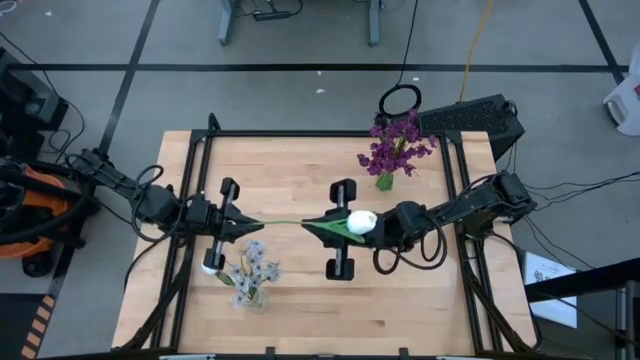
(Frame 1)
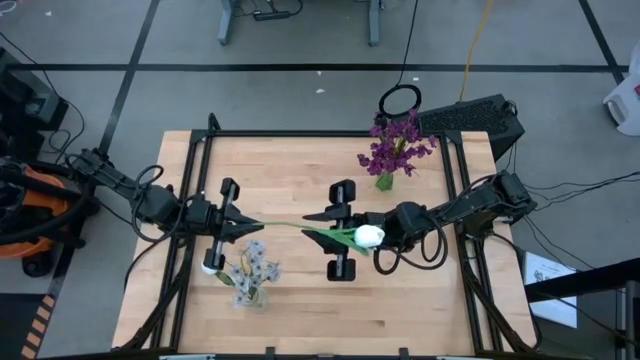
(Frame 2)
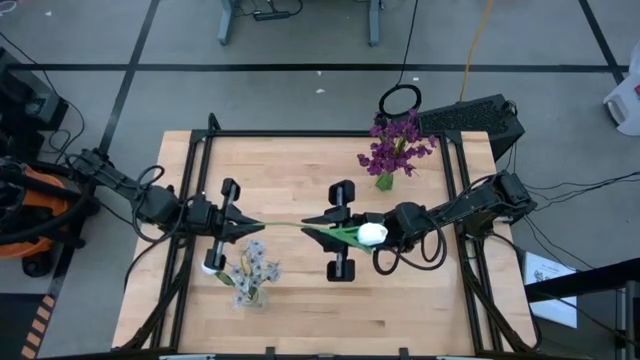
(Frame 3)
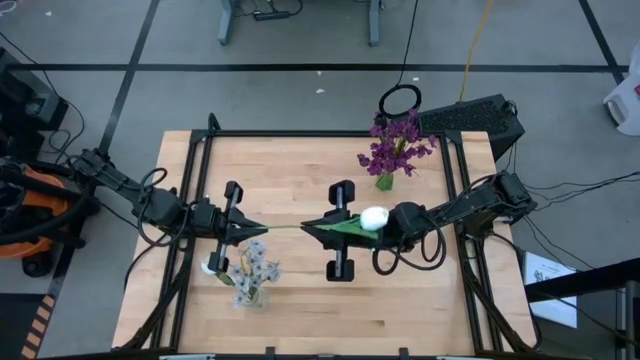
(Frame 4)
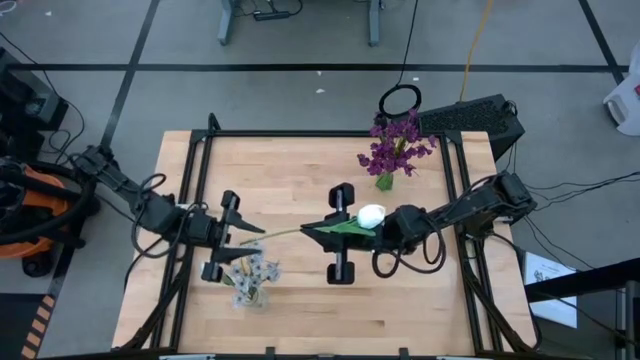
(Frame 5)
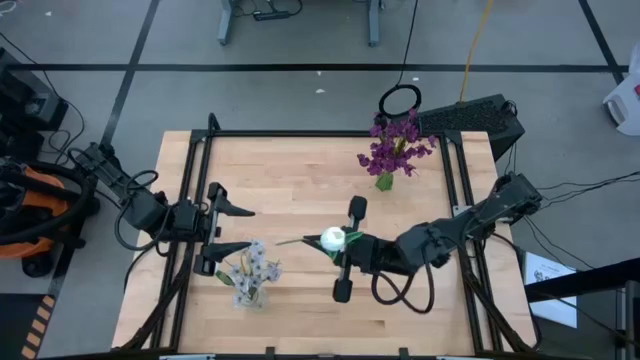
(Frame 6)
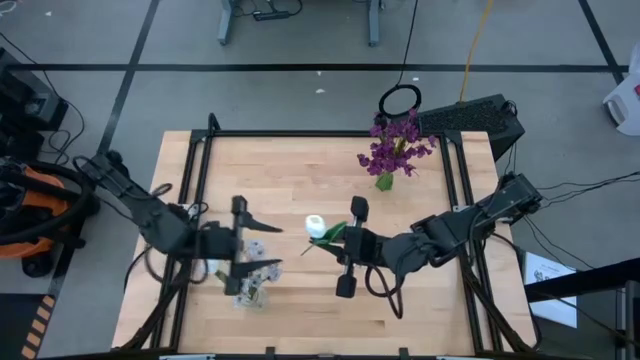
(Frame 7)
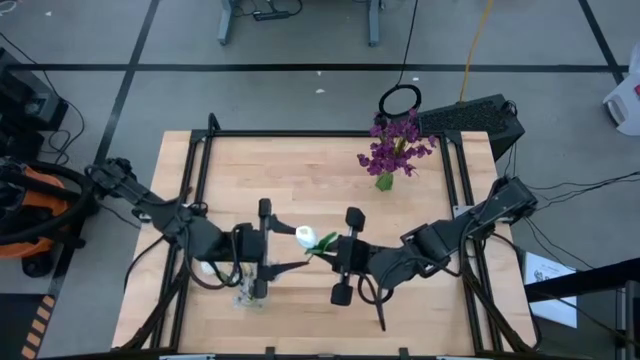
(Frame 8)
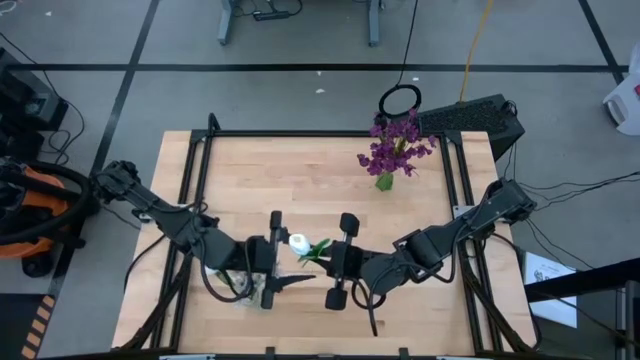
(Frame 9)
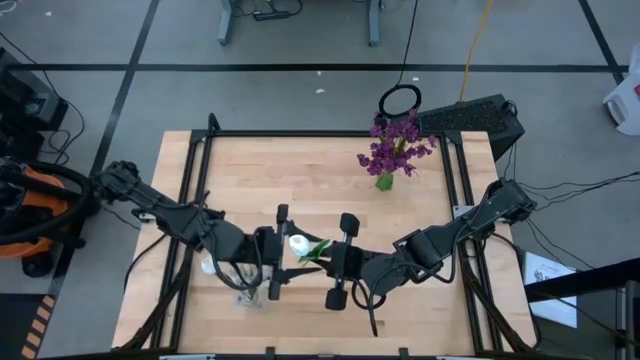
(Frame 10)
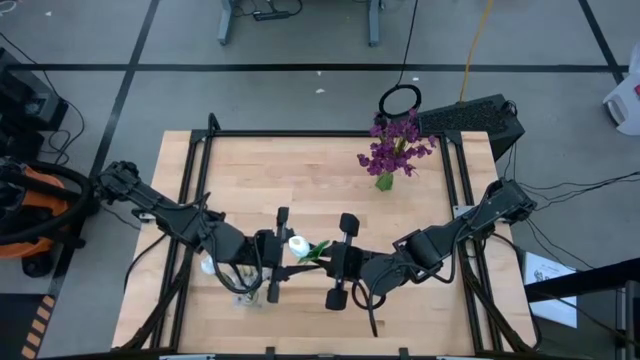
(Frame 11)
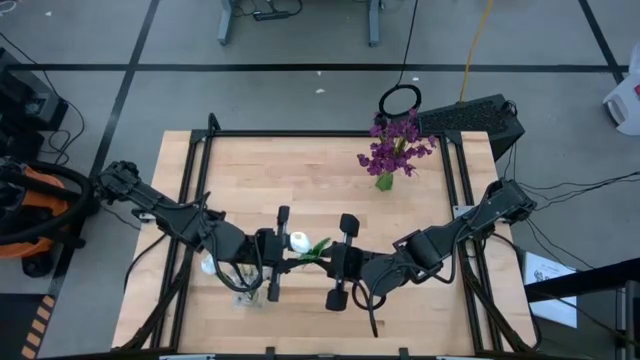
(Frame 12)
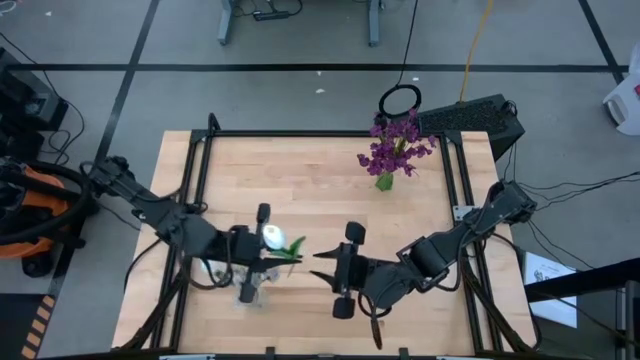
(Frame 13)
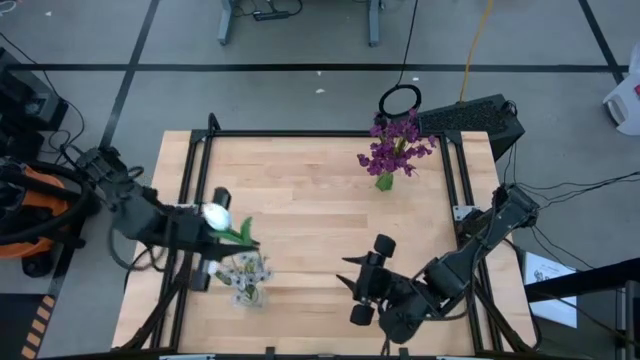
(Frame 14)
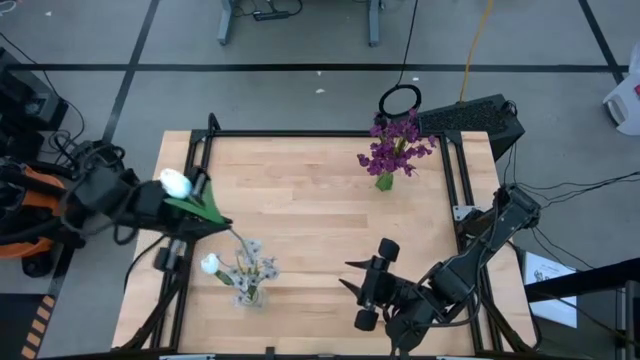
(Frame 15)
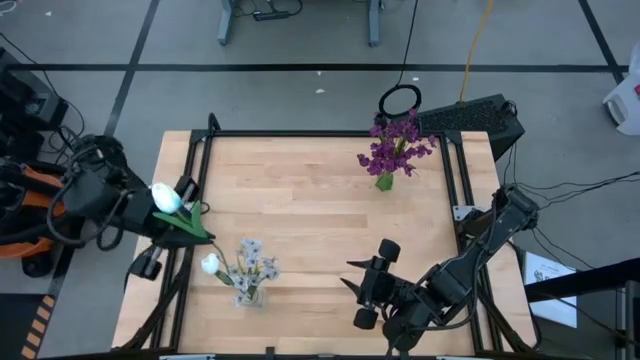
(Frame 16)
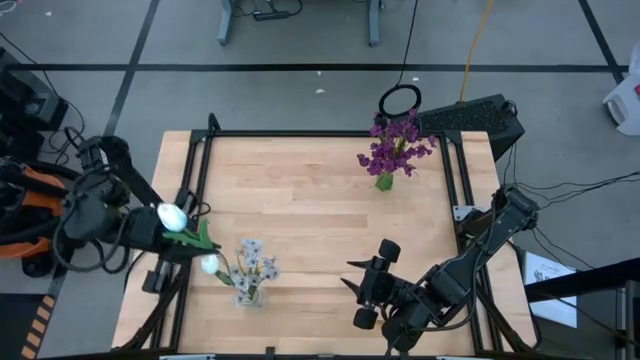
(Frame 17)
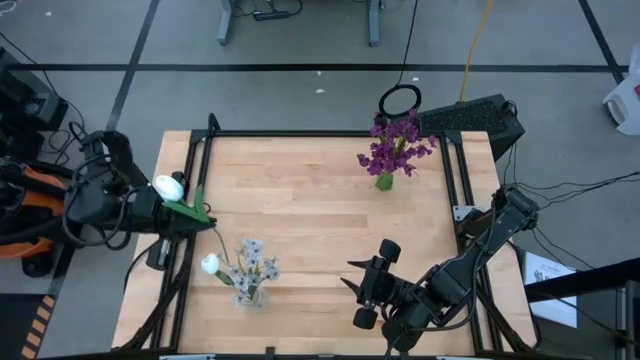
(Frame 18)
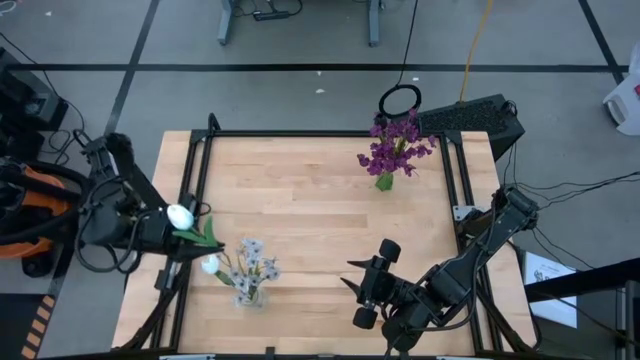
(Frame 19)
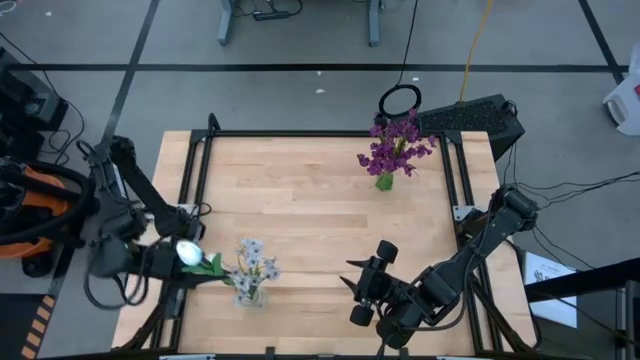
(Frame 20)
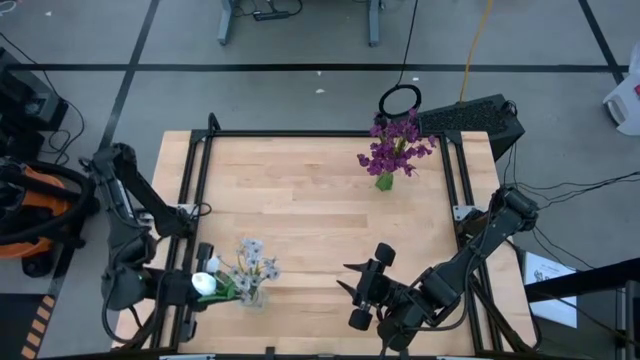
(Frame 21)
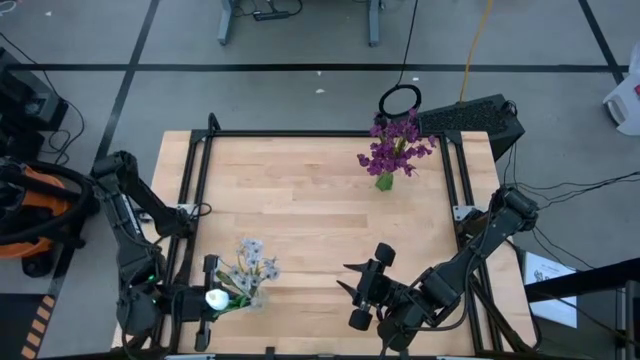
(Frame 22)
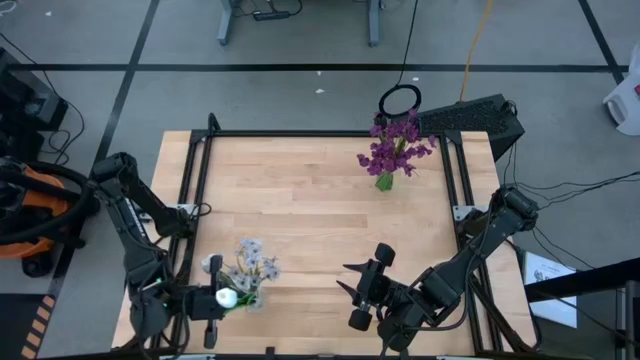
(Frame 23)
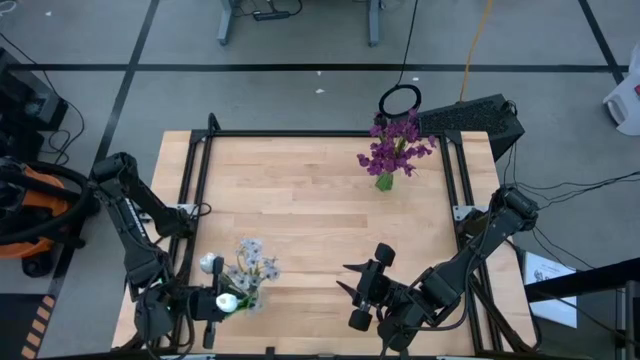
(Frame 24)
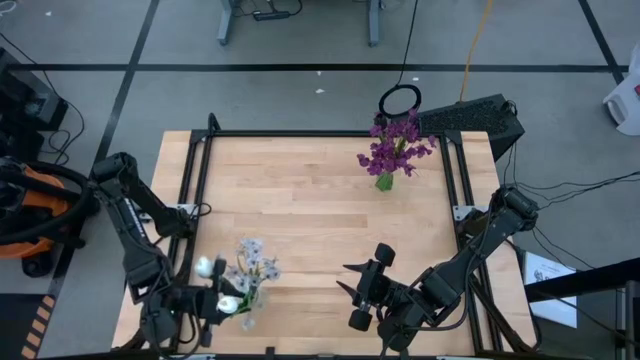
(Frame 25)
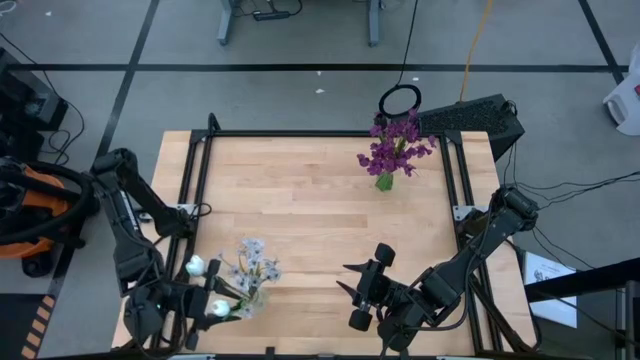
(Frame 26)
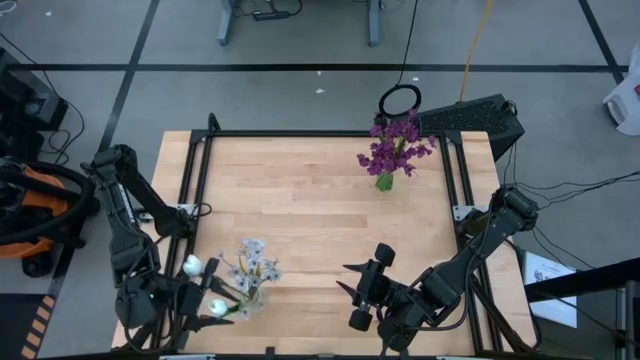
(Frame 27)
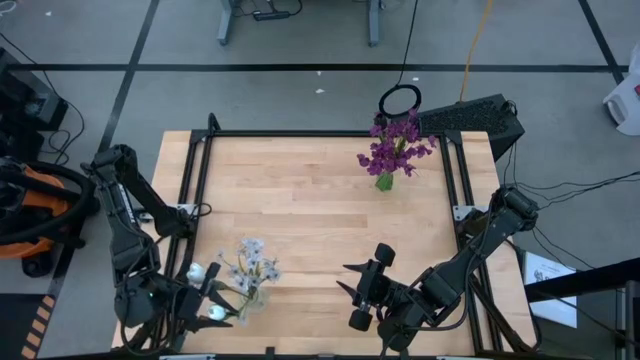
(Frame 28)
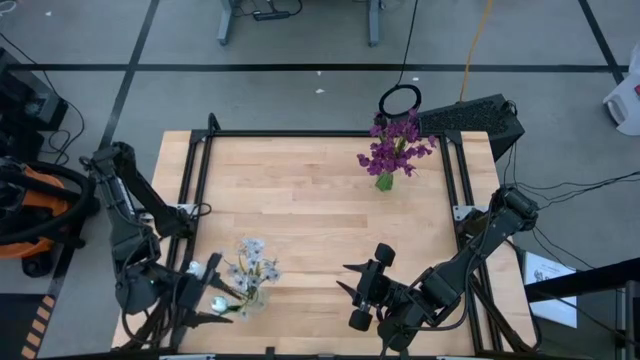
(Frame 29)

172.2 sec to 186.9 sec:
Task: Sort flowers into vase by color
Put the white flower into the transparent vase

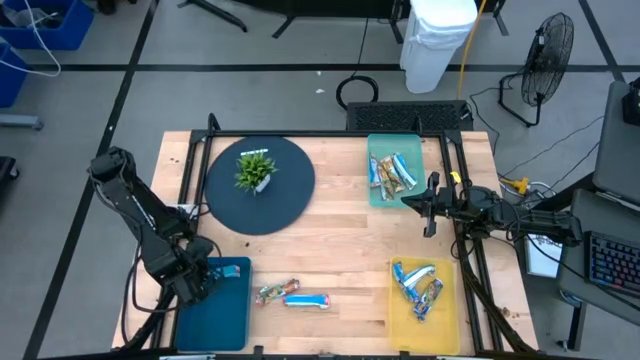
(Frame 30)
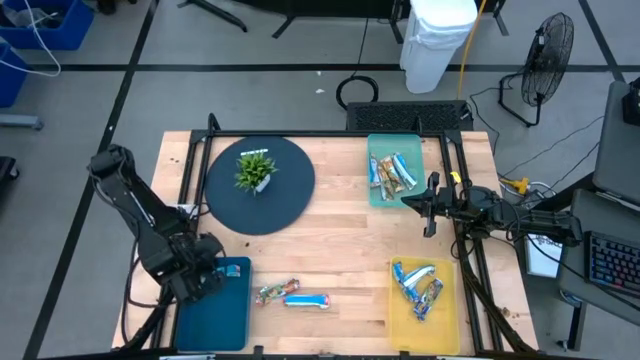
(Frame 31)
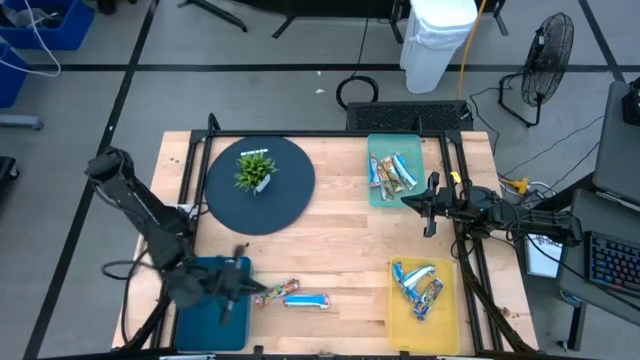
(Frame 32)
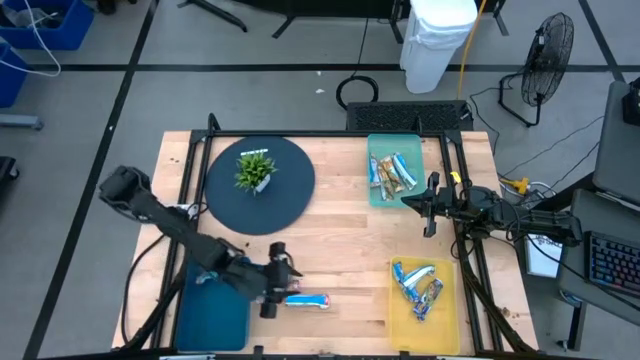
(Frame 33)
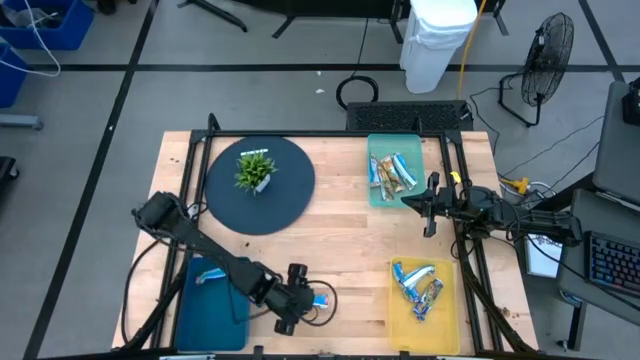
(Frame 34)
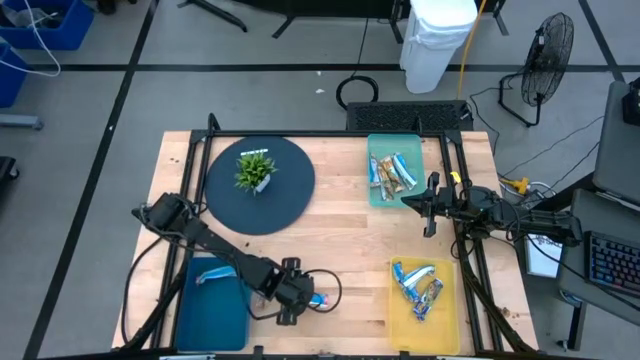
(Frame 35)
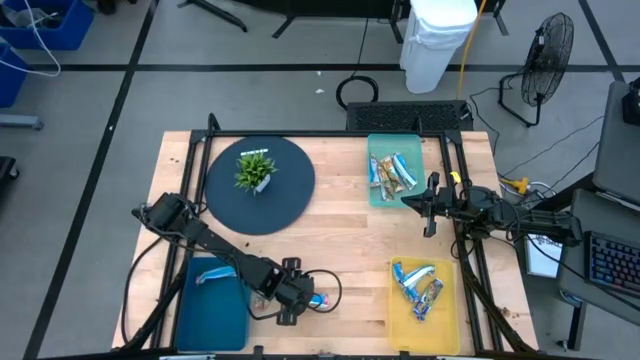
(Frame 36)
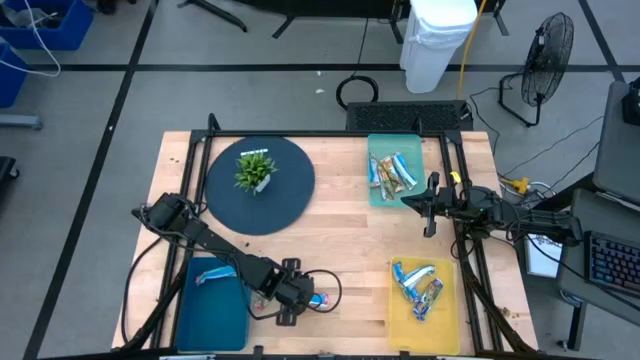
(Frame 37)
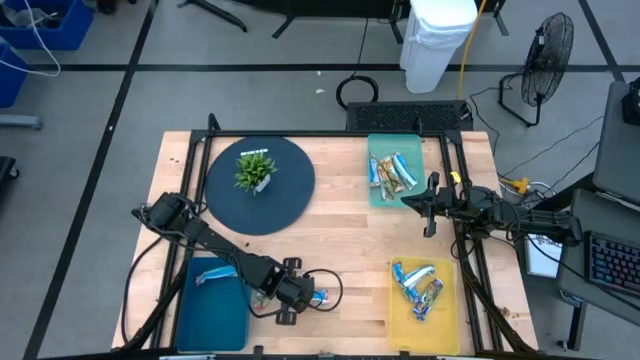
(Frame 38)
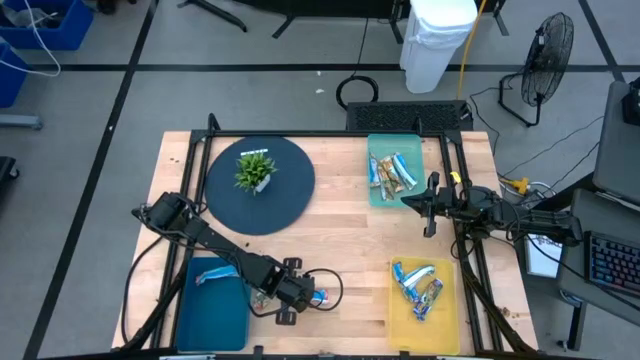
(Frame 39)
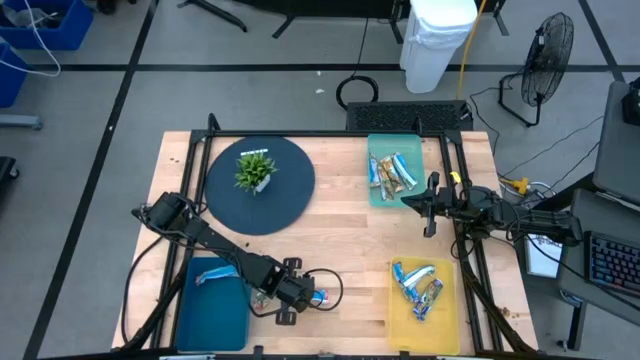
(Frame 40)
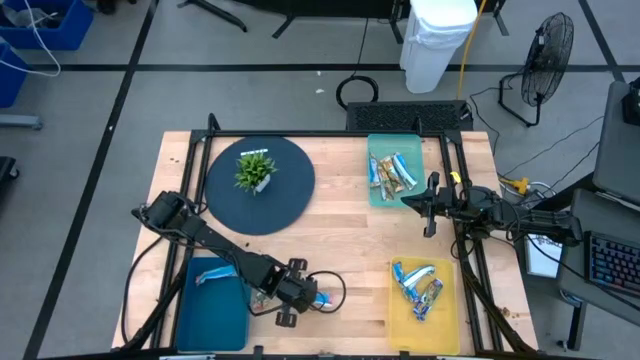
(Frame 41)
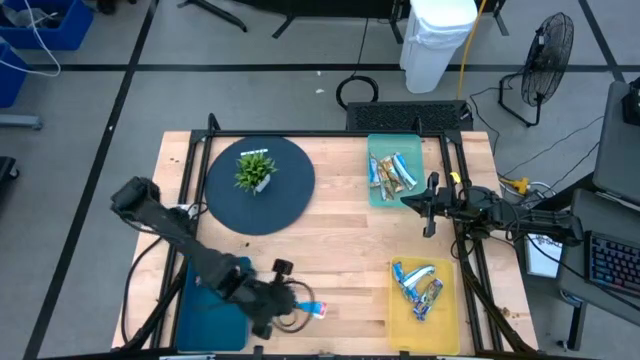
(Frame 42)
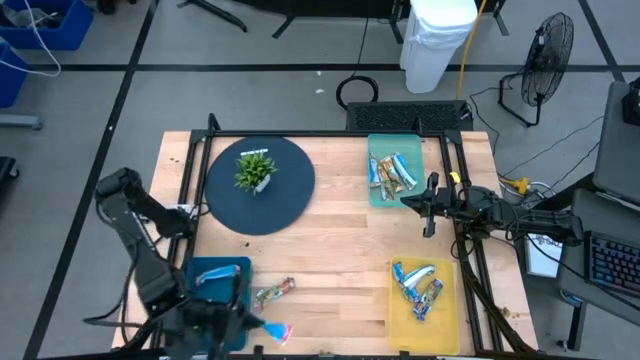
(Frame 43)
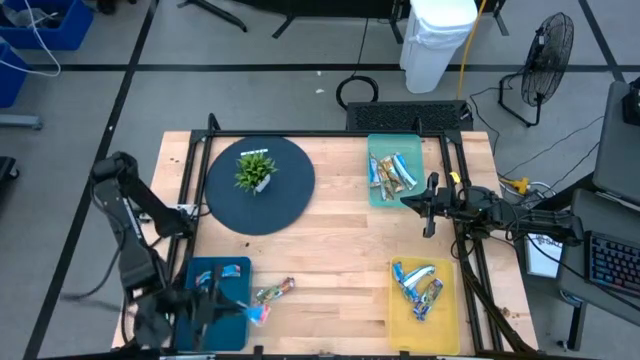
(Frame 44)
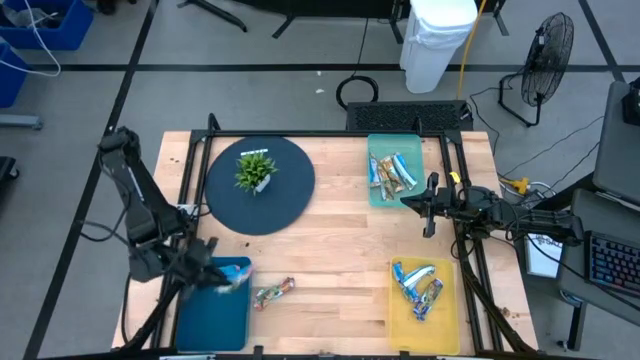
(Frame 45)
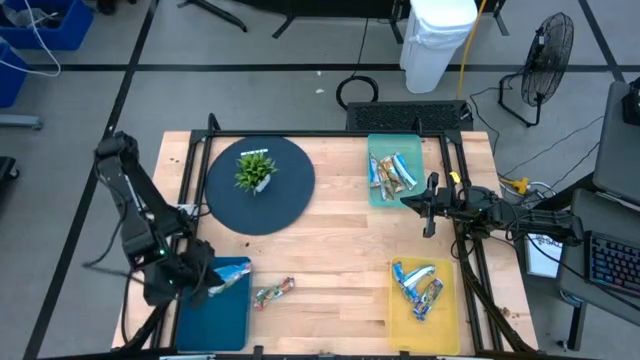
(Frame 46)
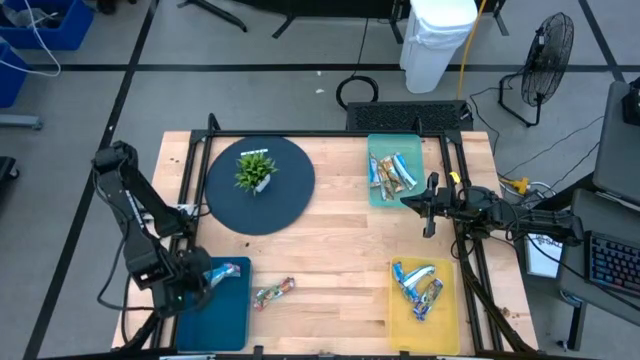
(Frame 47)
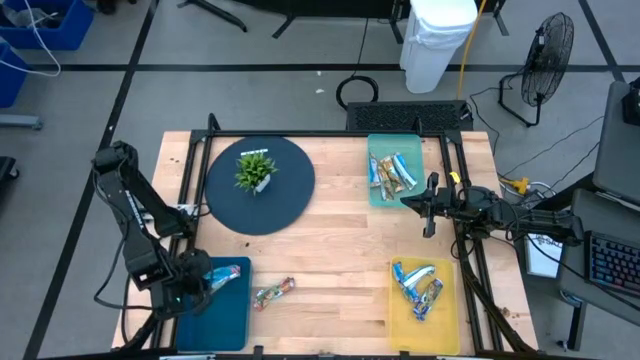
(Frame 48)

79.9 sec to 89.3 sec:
Task: Pick and place Granola Bars by type
Put the red granola bar into the blue bin
